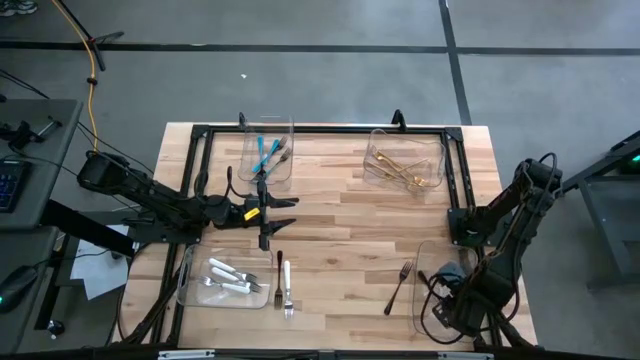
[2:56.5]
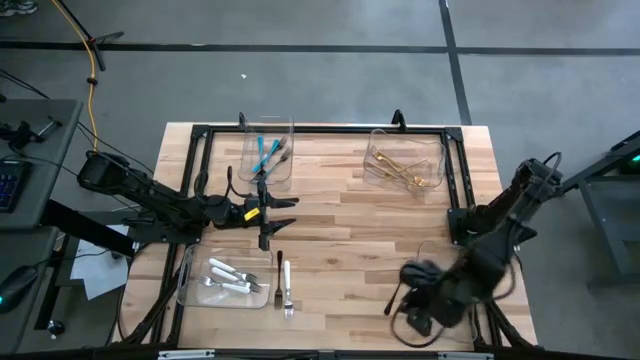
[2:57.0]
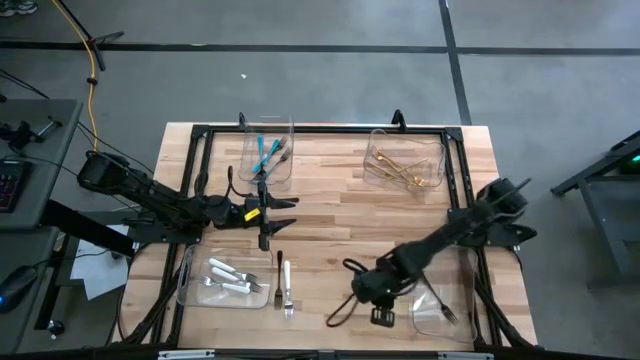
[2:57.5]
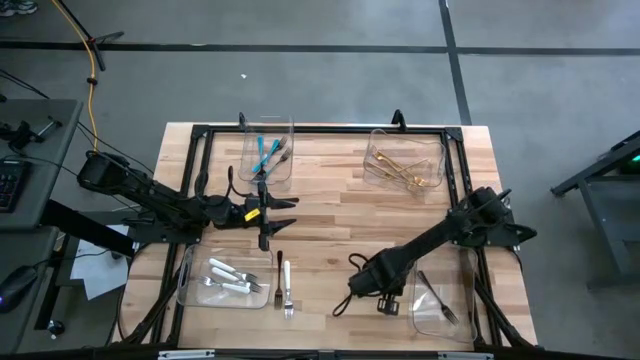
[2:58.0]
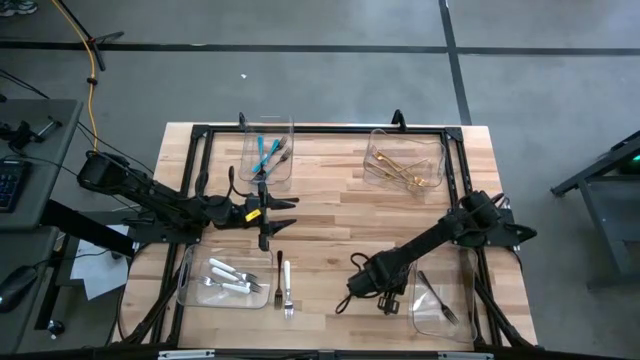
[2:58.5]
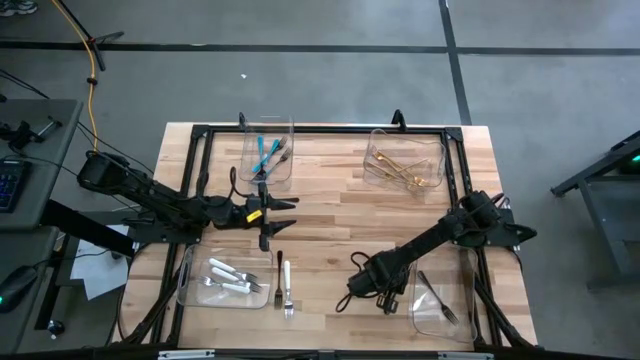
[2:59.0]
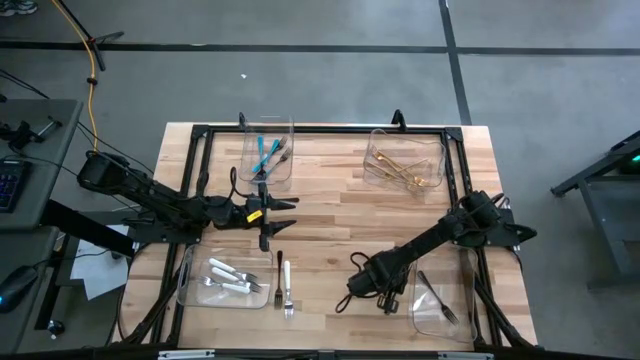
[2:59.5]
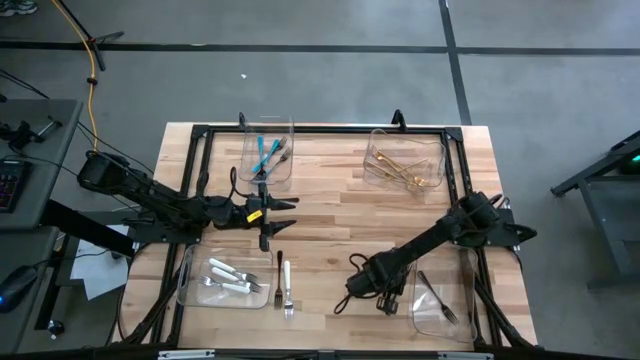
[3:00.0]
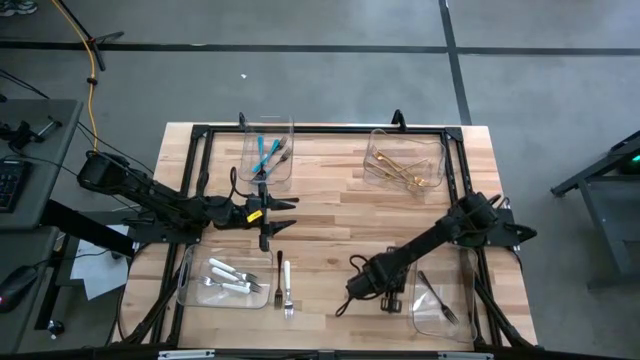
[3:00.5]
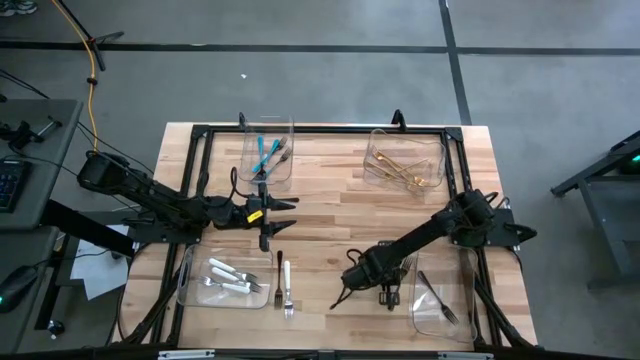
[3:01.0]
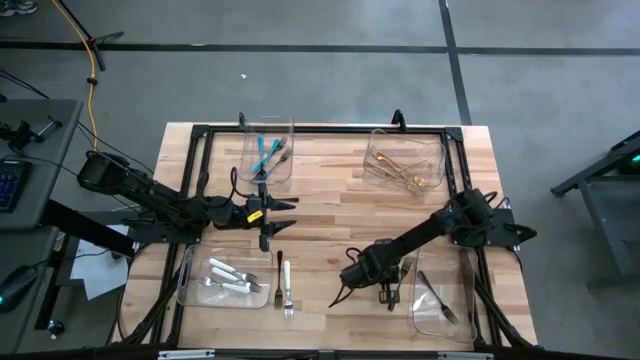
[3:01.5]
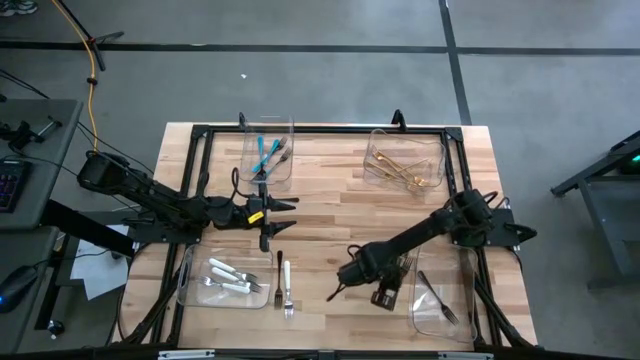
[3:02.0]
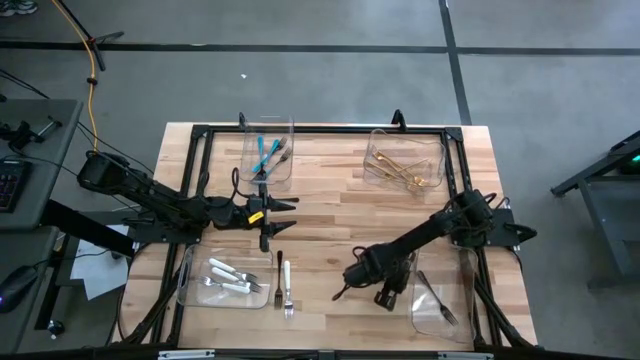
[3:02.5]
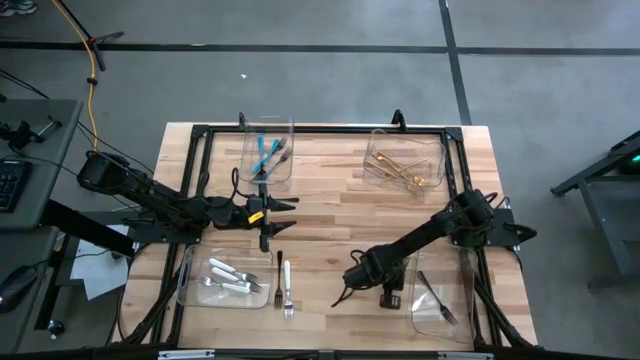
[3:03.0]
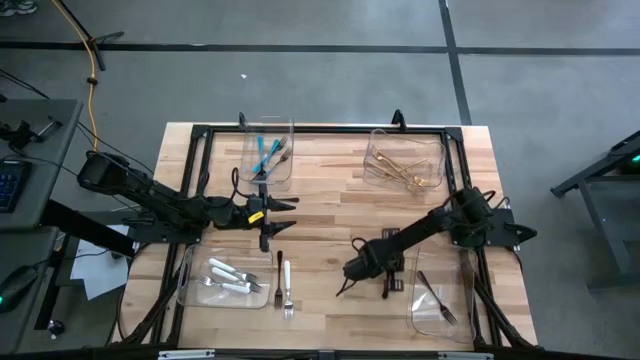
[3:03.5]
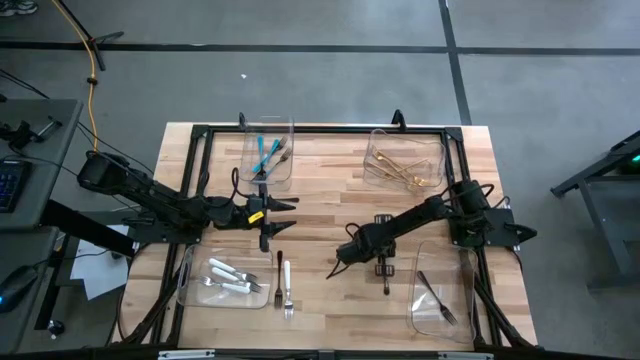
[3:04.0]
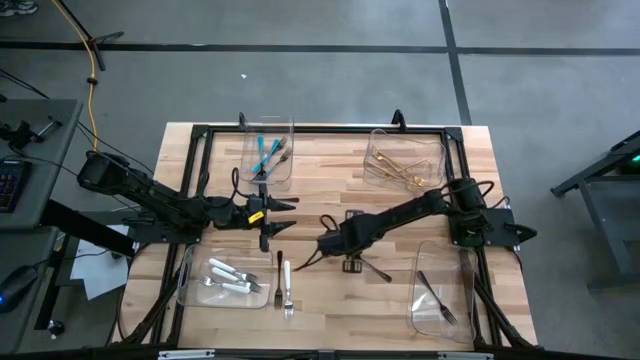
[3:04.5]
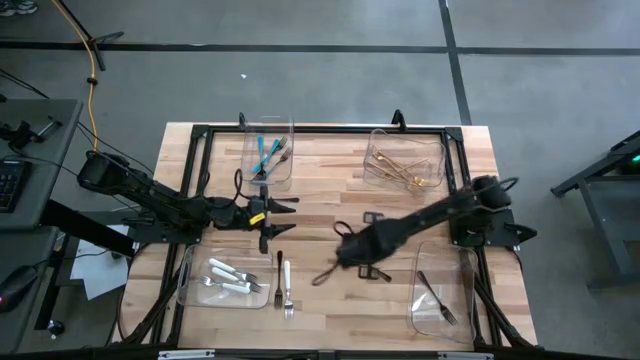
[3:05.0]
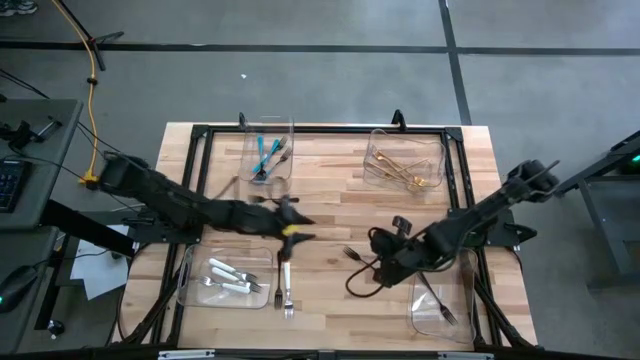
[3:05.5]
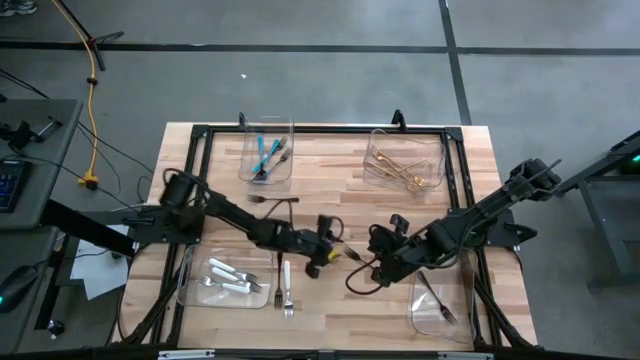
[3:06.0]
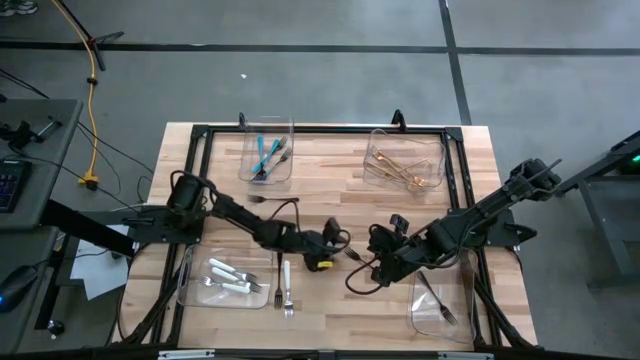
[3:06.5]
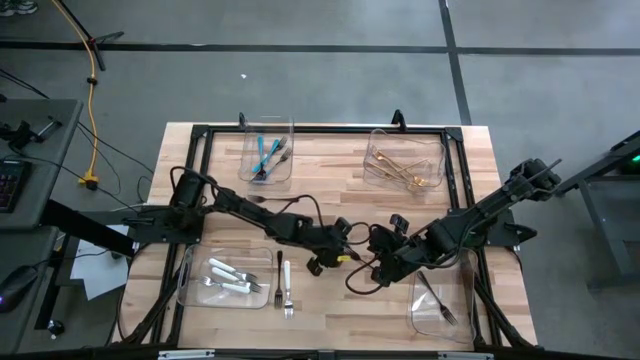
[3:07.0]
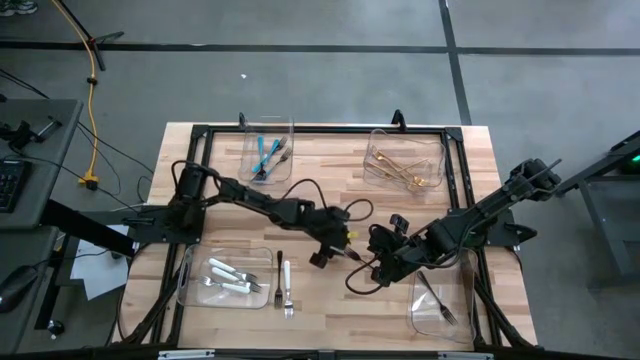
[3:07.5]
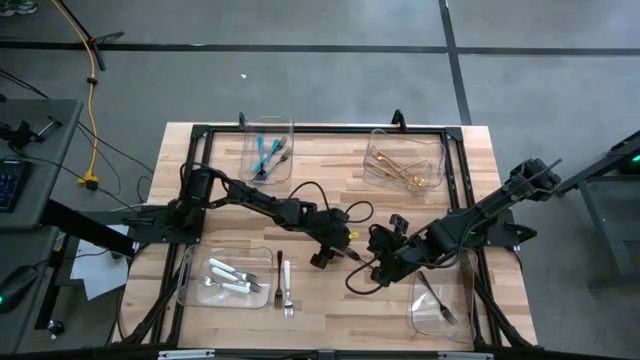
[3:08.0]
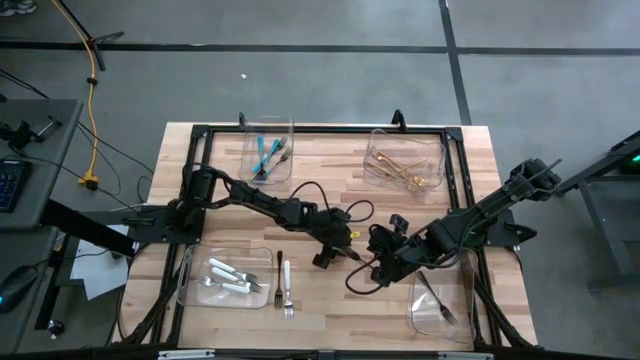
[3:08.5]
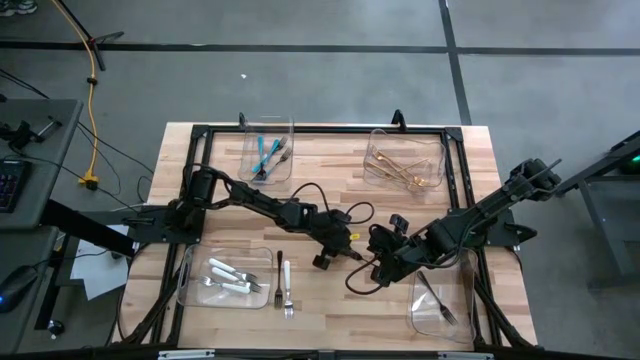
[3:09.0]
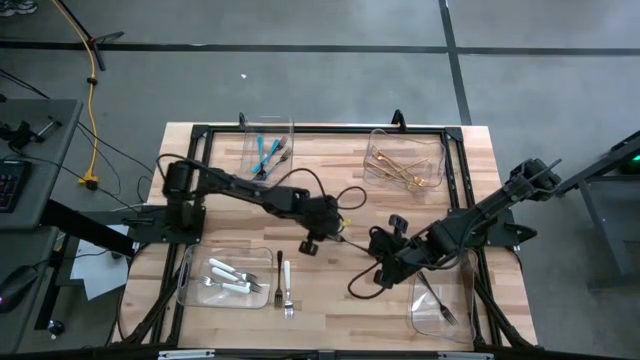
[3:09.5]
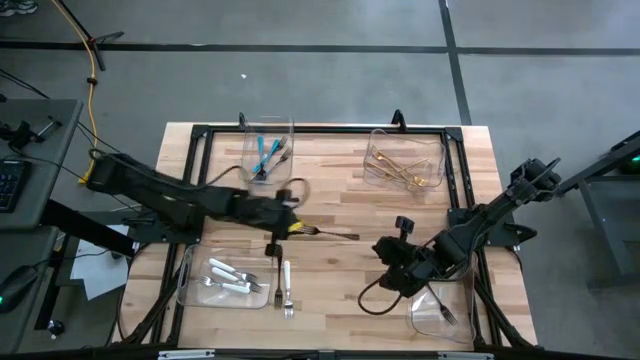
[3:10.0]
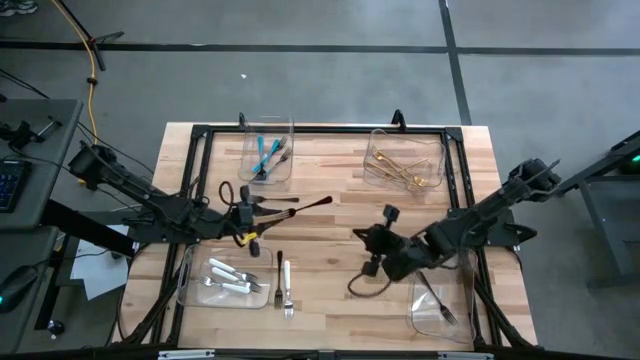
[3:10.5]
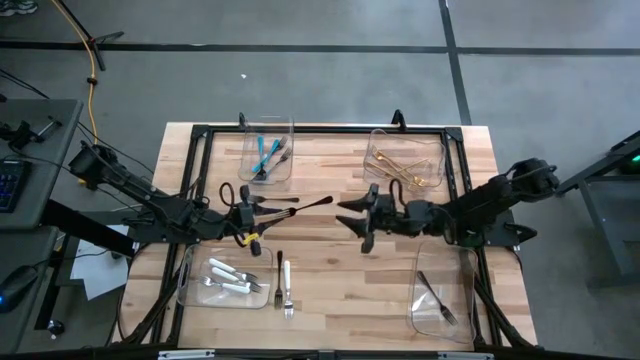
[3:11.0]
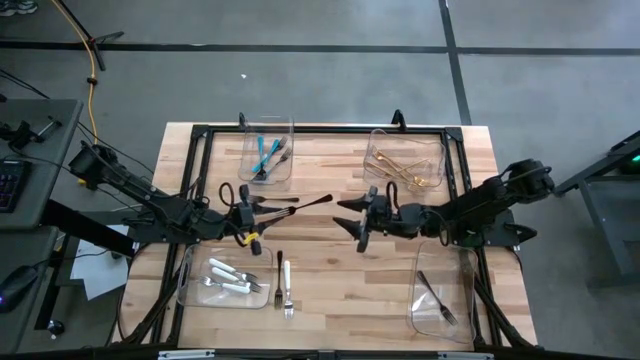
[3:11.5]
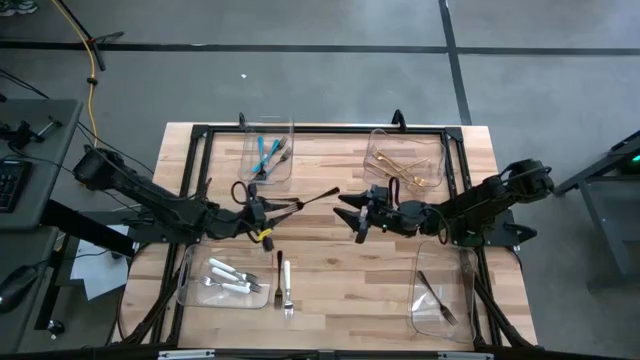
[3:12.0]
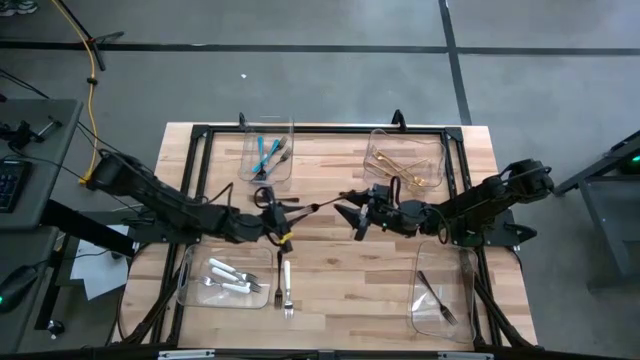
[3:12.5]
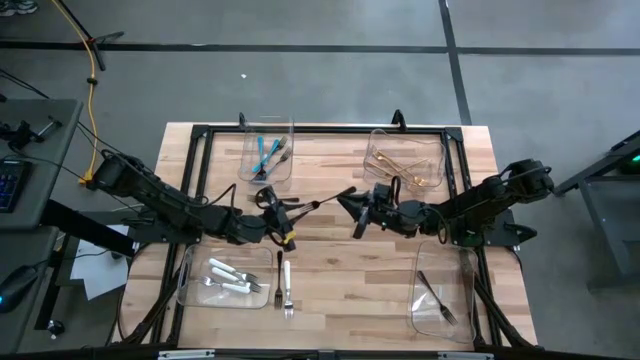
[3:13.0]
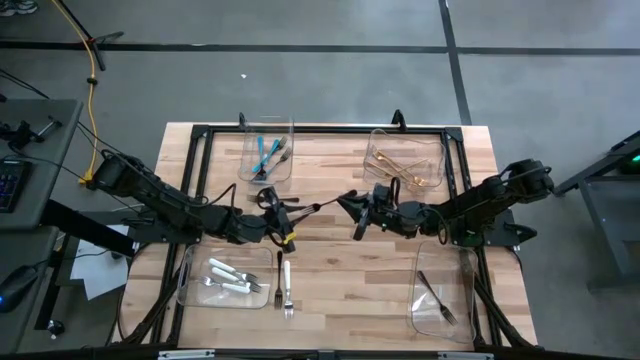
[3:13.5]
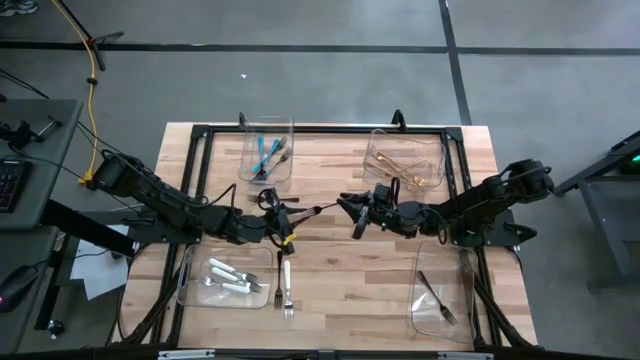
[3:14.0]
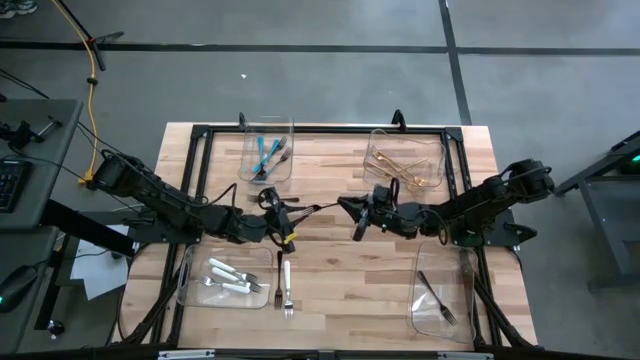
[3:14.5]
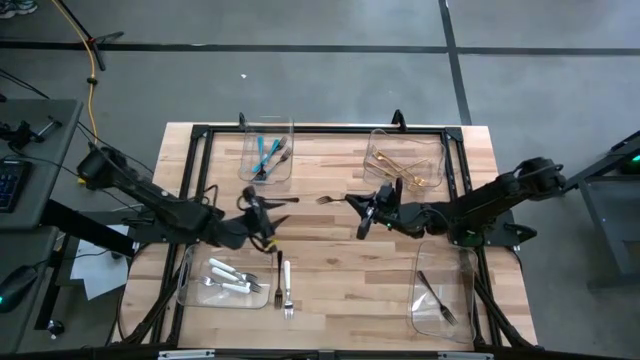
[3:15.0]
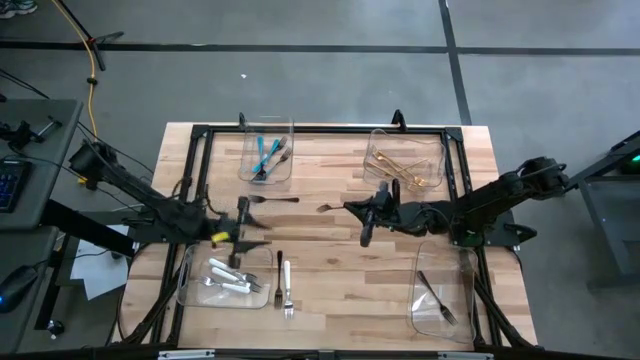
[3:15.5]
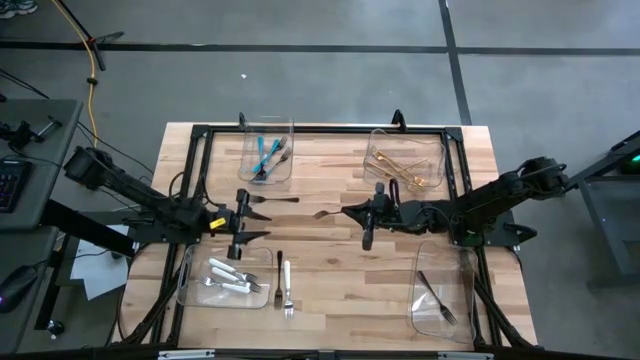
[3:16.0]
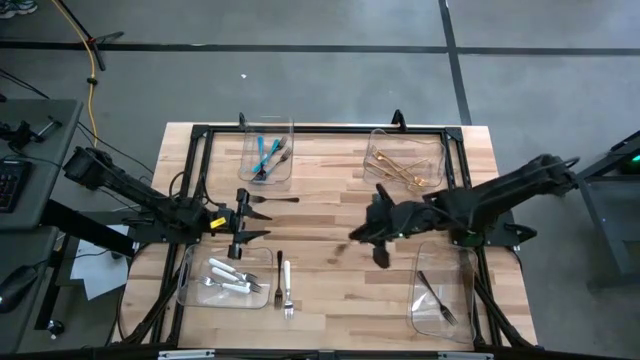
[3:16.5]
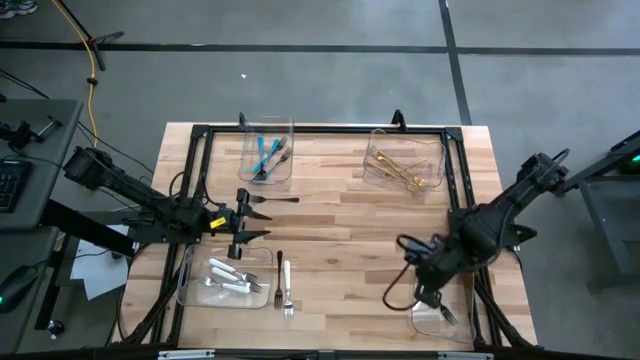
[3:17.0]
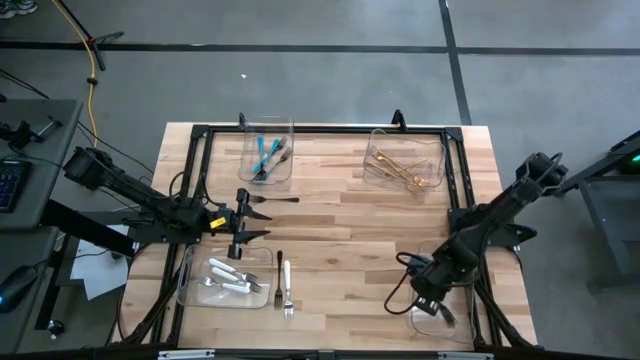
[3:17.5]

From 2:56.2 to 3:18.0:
Task: Sort silverware by color (type)
Put the black fork into the bottom right transparent bin
